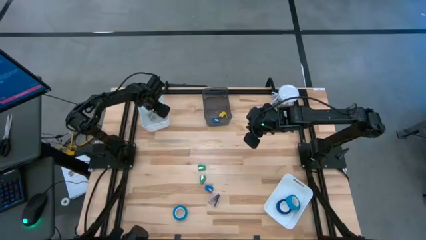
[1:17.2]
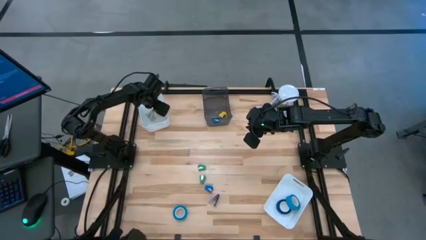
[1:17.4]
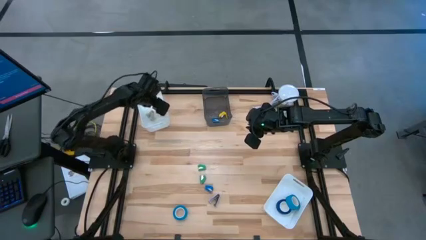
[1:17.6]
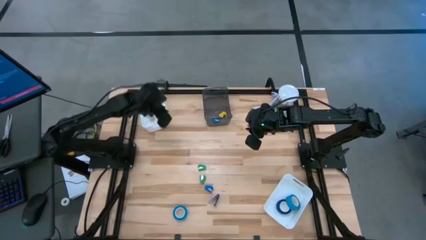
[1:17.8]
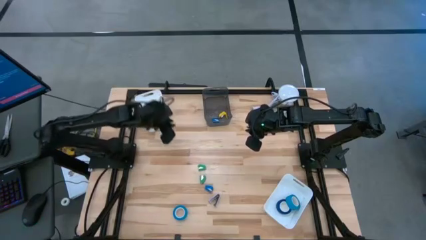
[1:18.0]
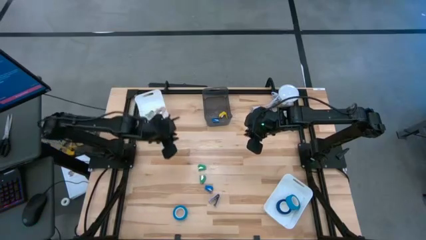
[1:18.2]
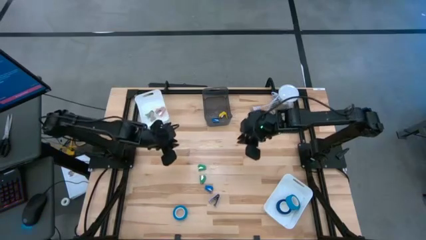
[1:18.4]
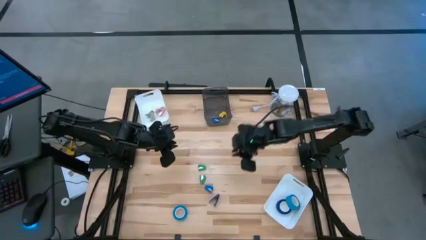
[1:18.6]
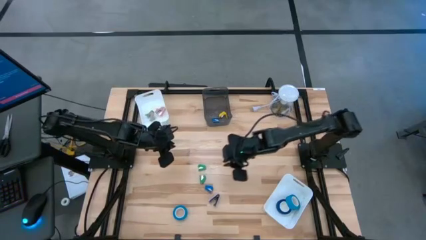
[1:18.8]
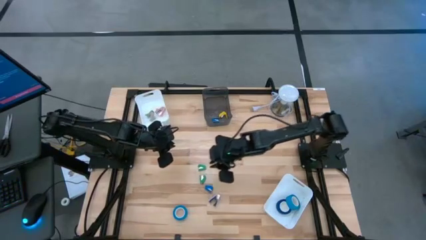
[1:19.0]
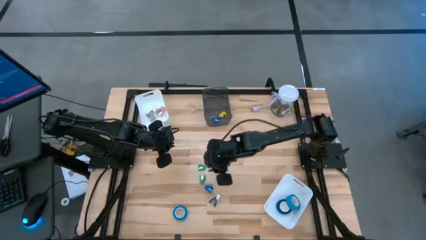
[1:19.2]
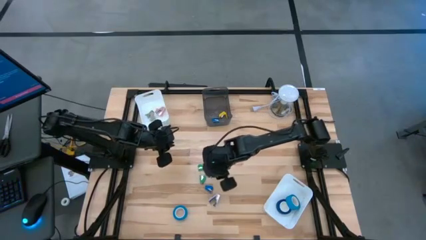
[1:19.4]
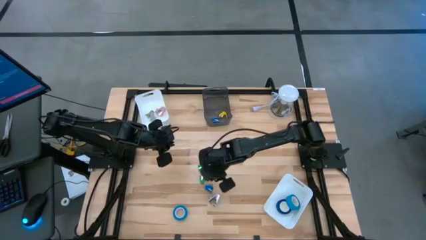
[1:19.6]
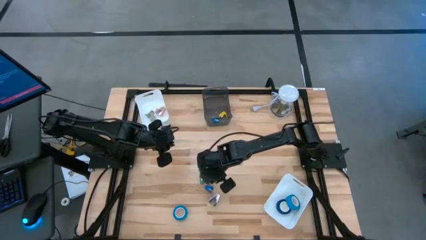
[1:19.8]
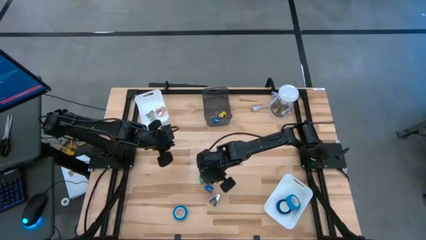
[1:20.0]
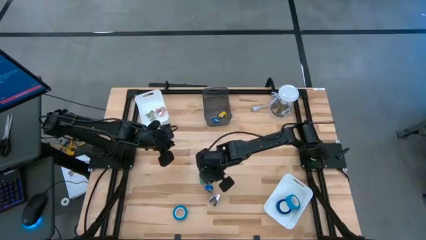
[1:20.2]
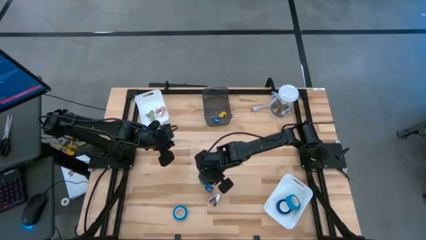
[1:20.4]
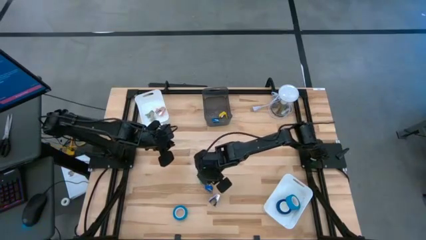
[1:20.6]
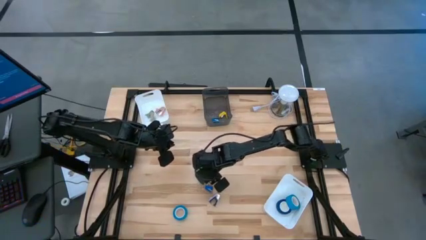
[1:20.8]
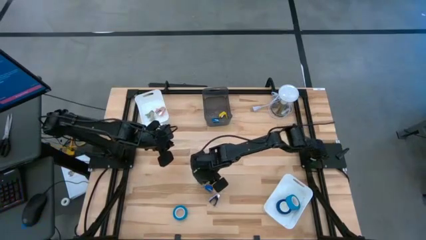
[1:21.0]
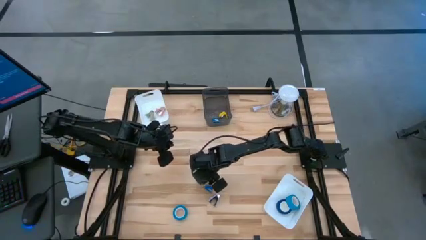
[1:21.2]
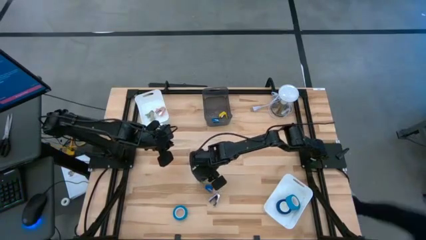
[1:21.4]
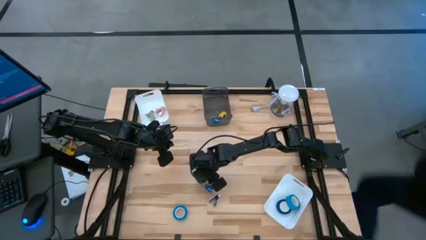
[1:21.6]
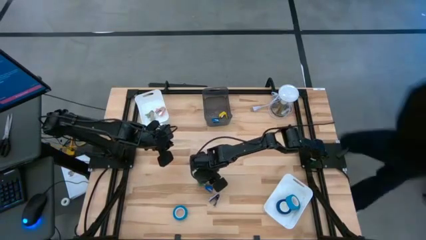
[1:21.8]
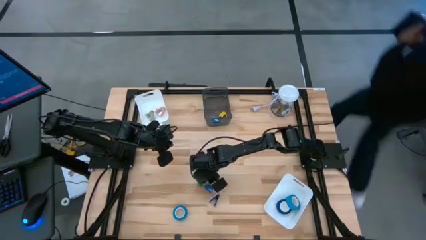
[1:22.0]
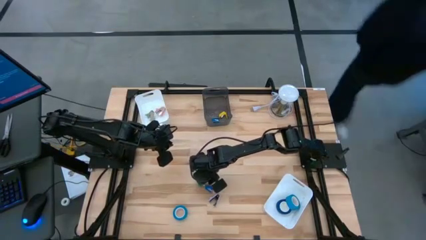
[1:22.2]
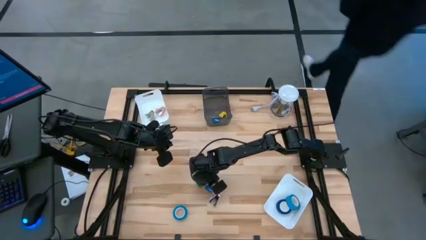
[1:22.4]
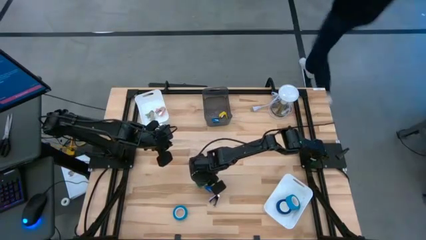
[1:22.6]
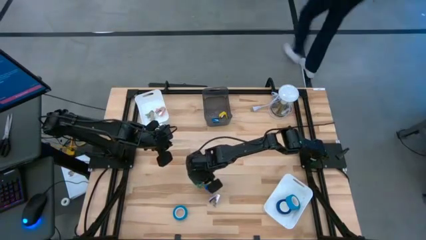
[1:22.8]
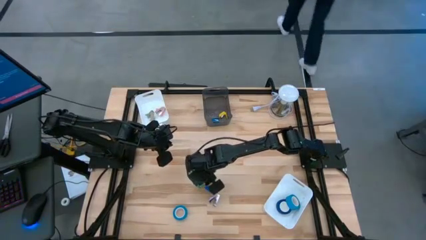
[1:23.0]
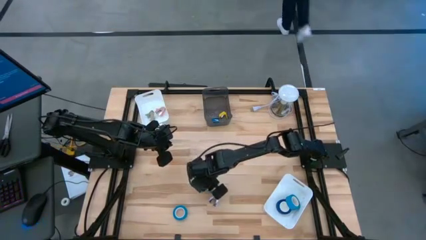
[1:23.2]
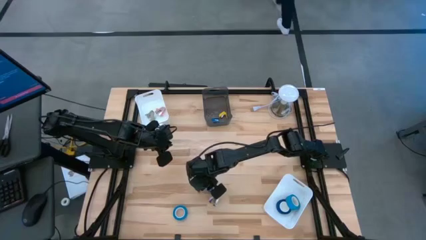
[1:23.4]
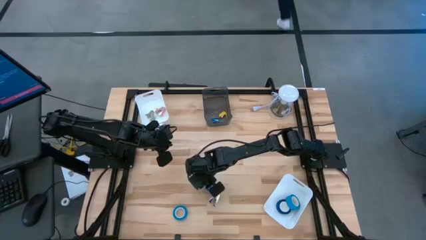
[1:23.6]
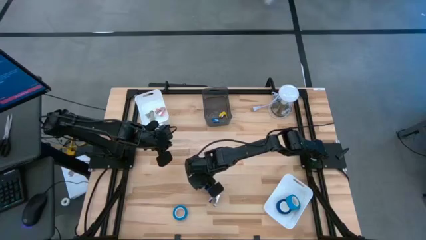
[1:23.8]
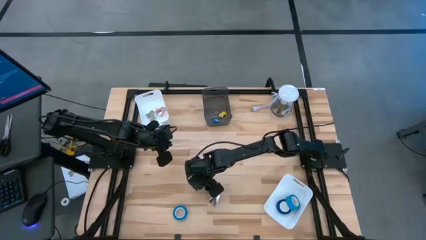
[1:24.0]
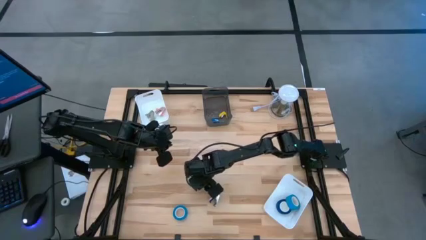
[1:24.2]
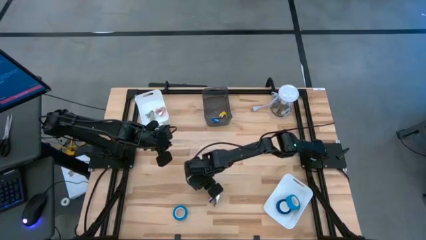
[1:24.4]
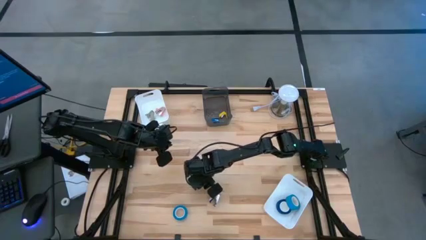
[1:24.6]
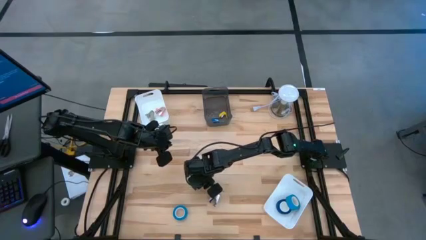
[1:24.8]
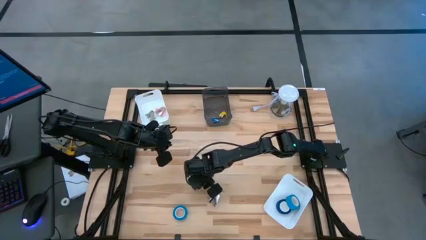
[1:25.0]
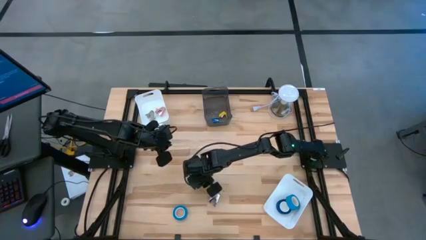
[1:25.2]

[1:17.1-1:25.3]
Task: Pick and place Stapler, Stapler remover, tape
Put the bottom green stapler into the black bin

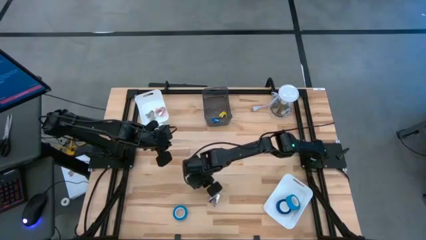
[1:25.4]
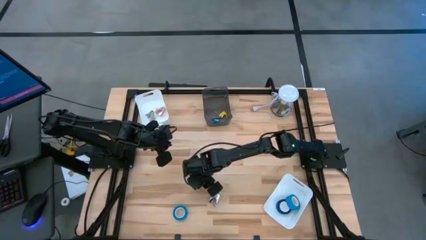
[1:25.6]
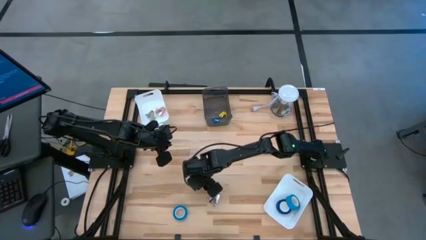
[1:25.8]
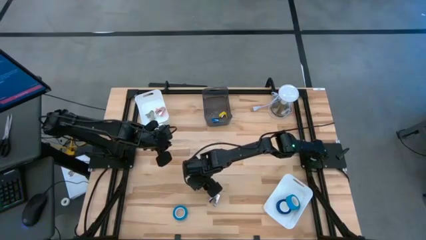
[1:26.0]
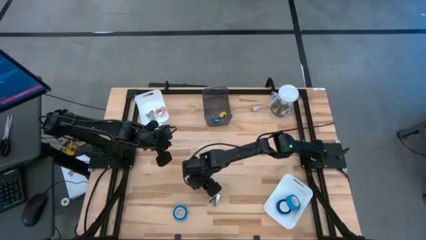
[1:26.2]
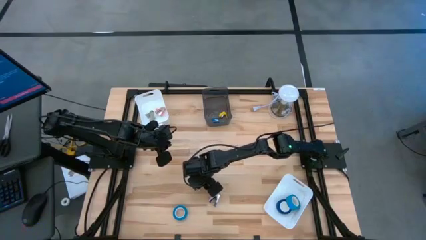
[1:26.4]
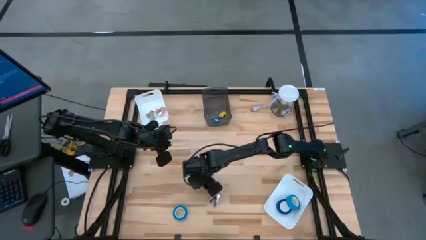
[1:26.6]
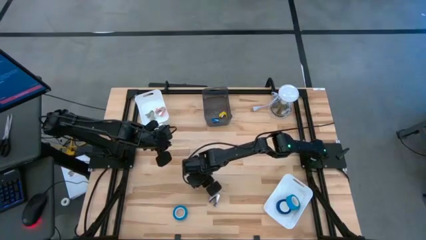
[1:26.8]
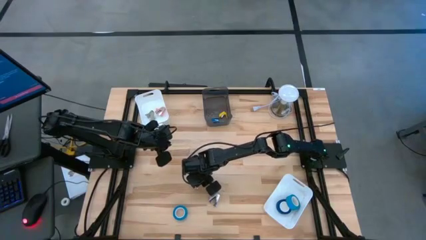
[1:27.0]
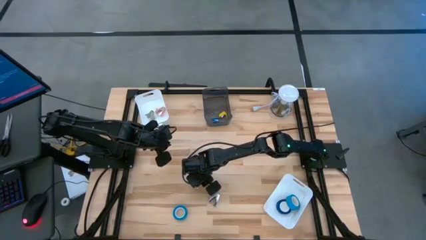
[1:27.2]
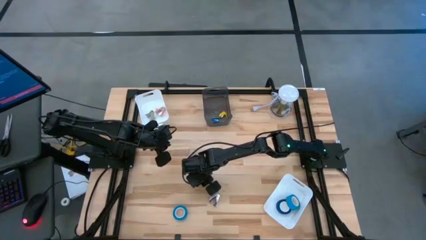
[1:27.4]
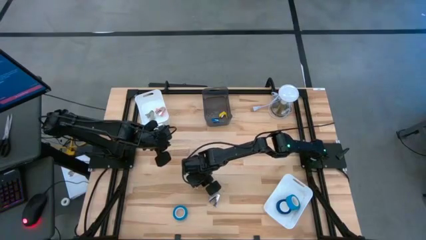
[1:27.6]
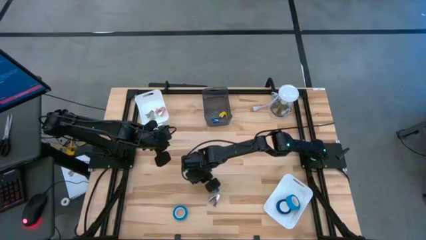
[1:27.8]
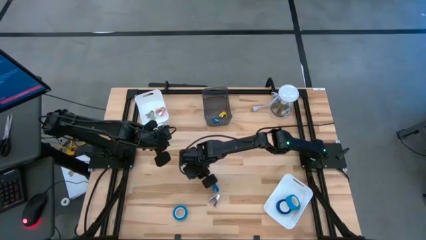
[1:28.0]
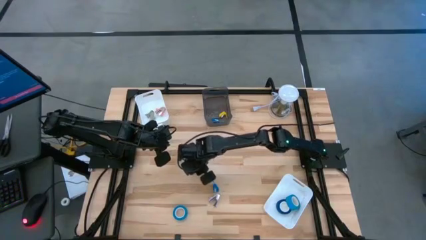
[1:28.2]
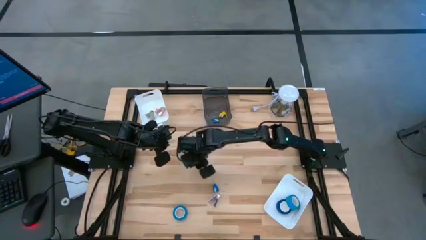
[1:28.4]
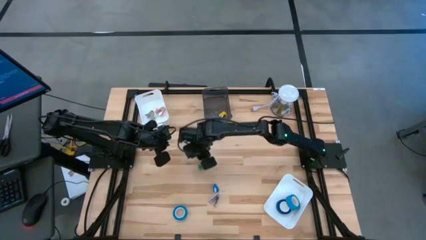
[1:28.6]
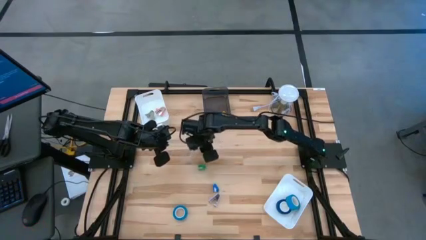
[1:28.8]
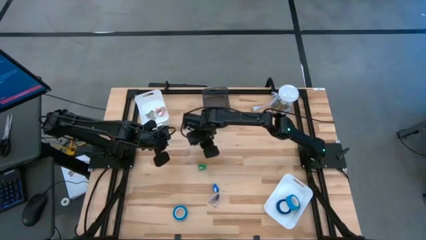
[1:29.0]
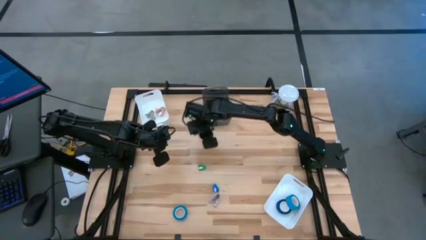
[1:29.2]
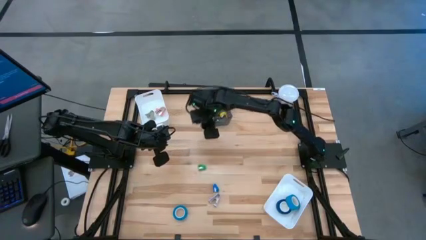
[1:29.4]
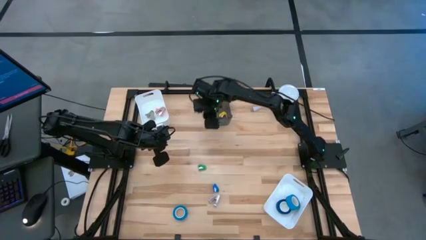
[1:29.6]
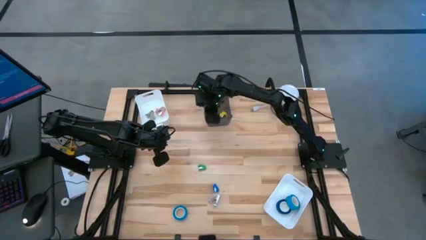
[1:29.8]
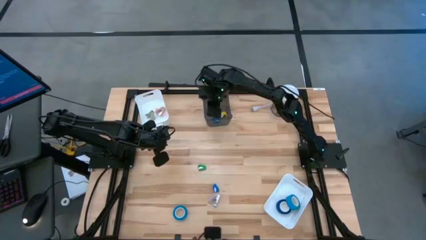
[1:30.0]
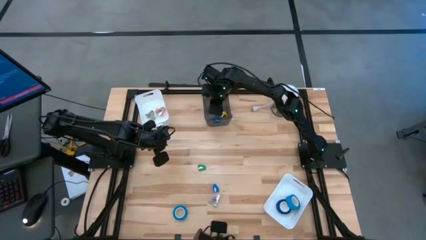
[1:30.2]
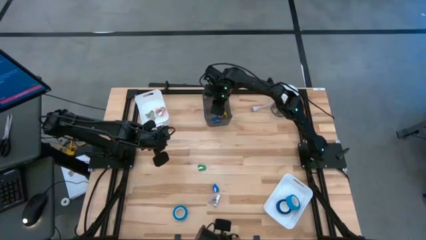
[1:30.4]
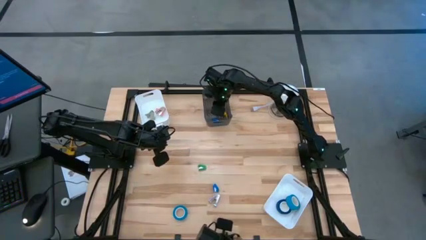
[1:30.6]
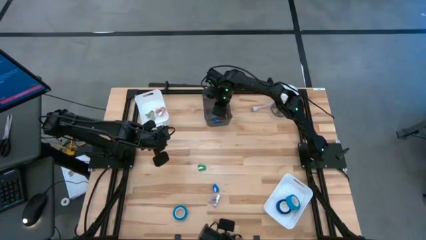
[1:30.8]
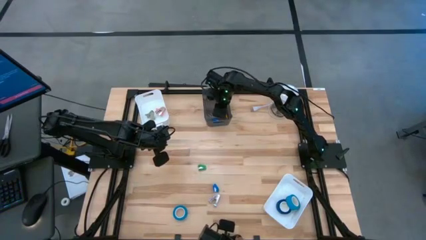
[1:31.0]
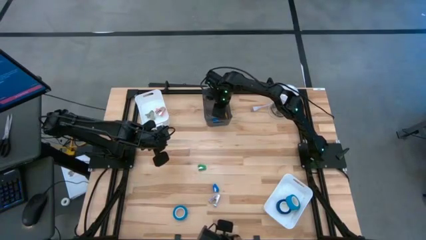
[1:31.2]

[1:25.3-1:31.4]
Put the bottom green stapler into the black bin

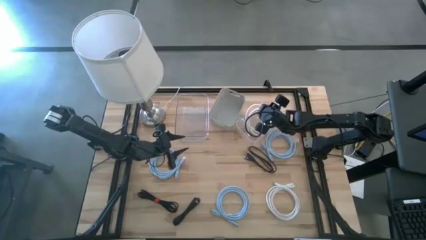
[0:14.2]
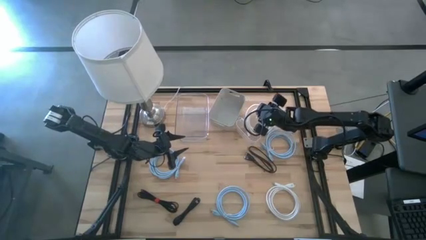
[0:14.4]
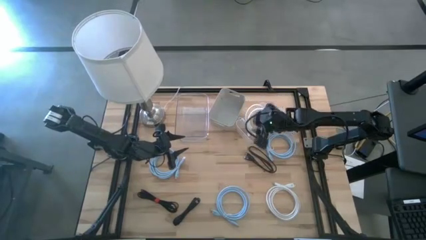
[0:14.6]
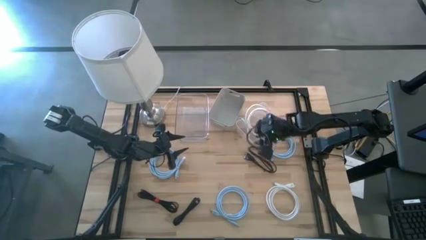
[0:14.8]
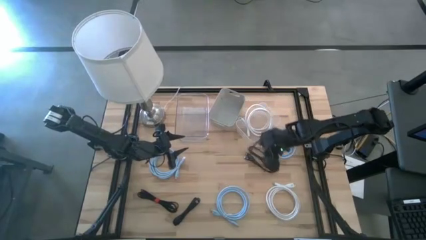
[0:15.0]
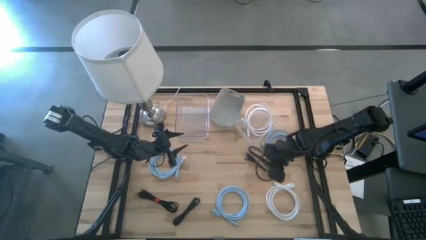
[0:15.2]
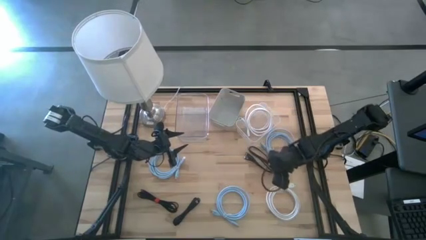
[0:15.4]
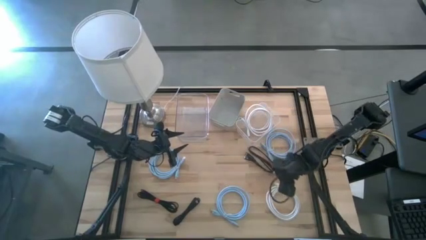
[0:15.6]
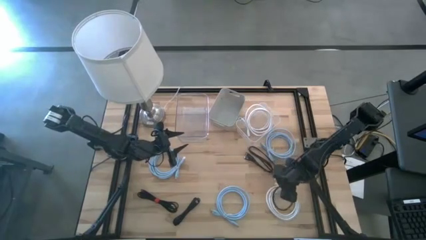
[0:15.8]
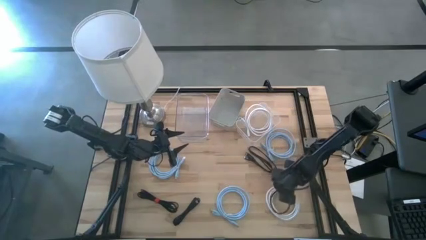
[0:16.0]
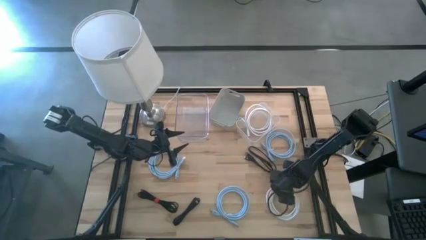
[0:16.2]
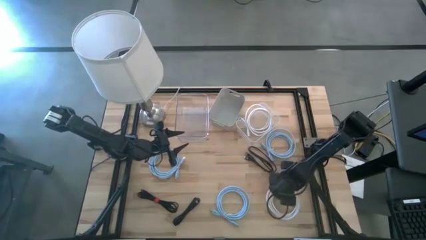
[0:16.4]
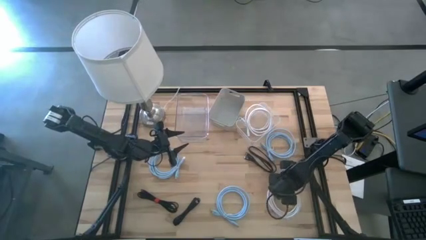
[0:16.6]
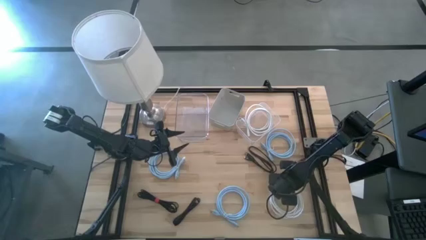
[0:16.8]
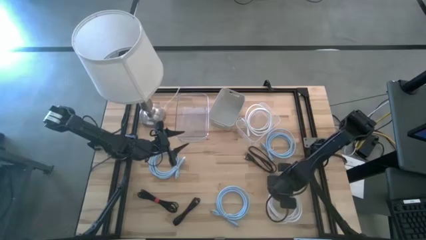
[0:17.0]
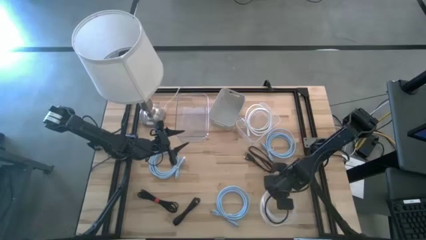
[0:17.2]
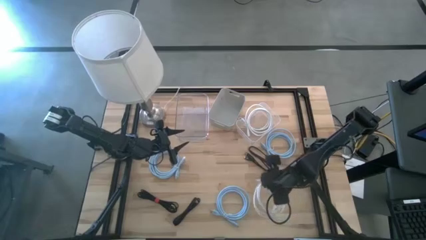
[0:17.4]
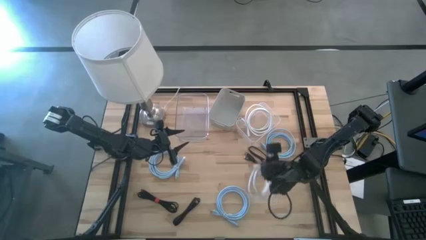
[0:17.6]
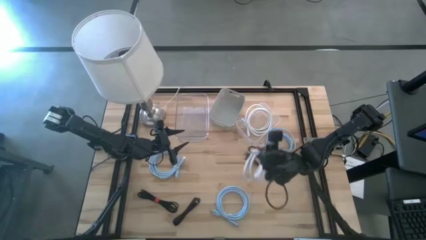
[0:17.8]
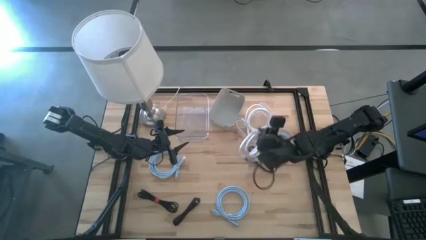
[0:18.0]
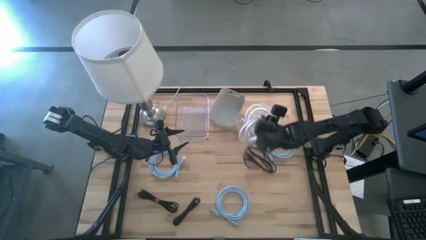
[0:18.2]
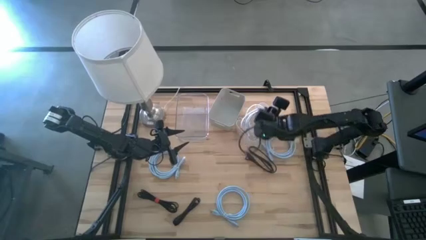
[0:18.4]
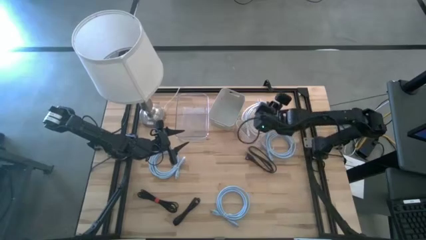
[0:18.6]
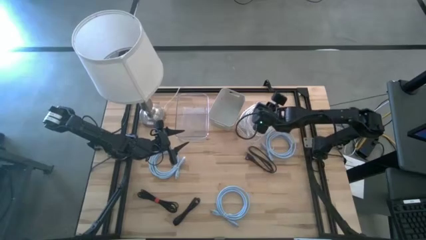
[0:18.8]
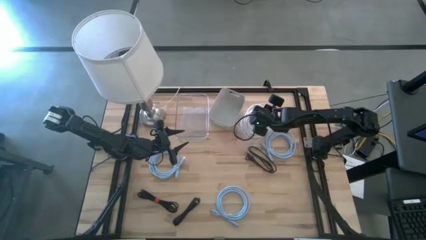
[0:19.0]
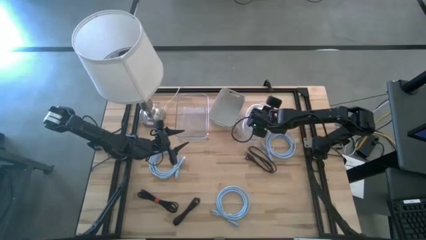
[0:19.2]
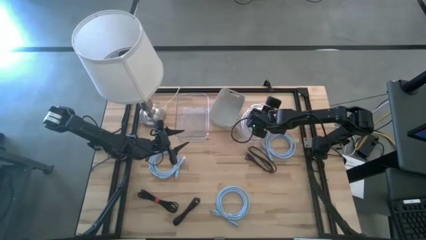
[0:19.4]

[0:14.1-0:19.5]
Task: Sort HDMI cables
Put the white HDMI cable into the right transparent bin
